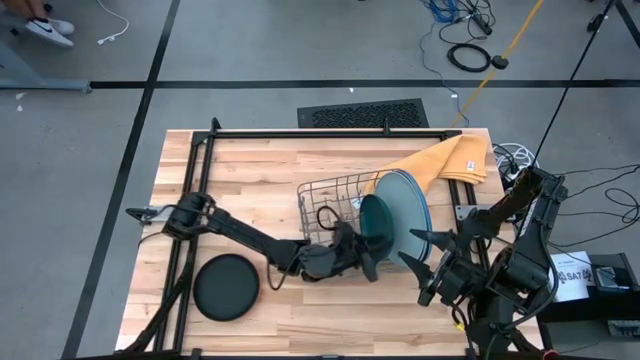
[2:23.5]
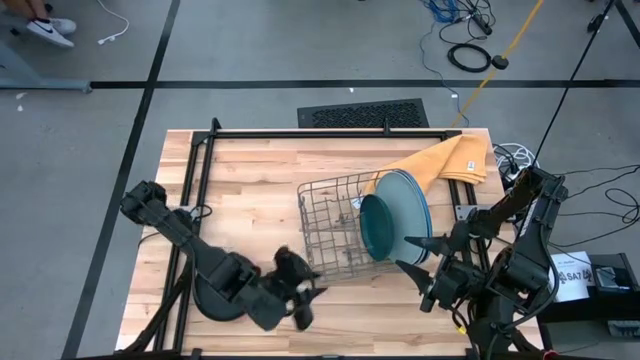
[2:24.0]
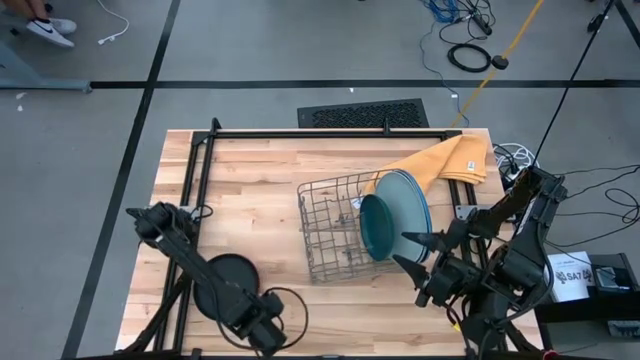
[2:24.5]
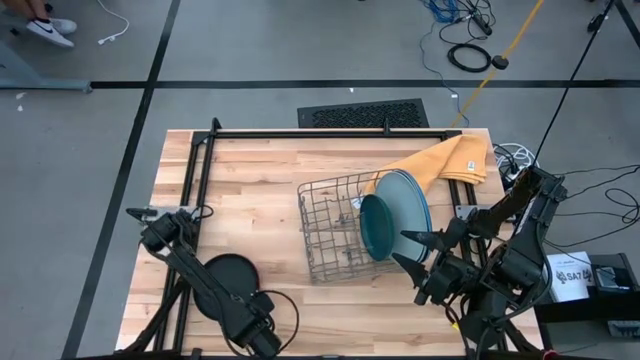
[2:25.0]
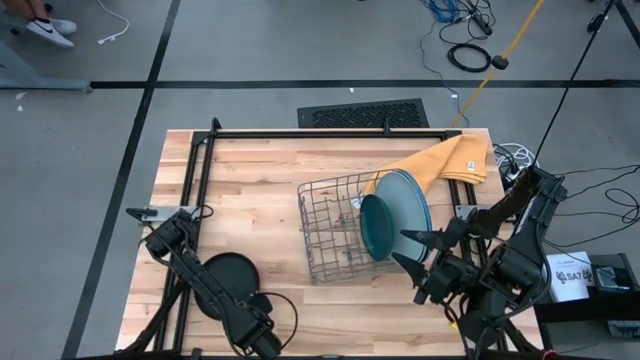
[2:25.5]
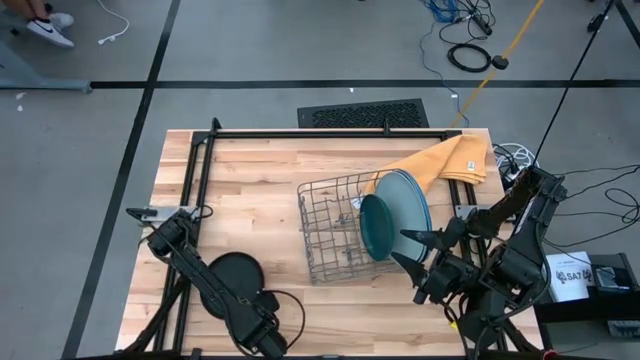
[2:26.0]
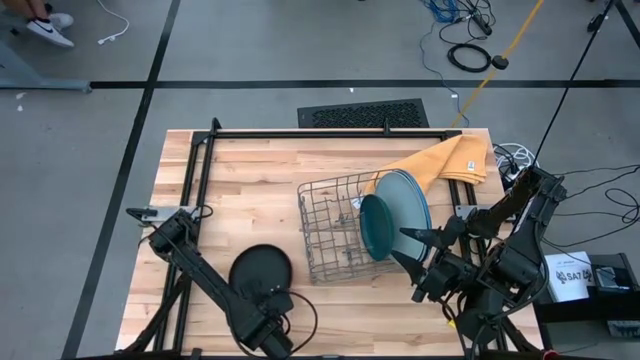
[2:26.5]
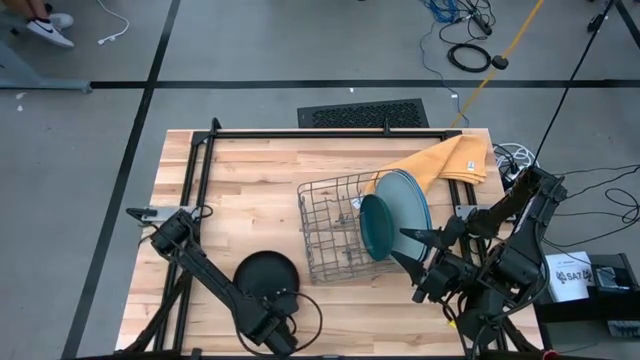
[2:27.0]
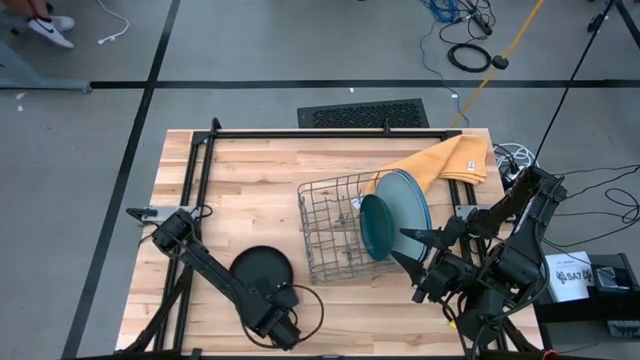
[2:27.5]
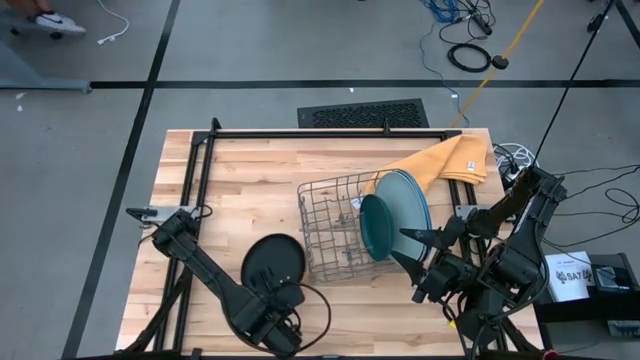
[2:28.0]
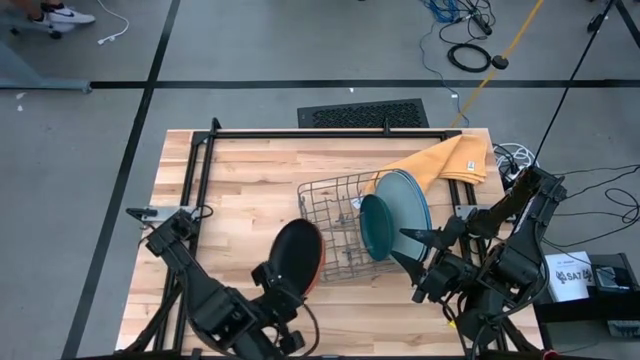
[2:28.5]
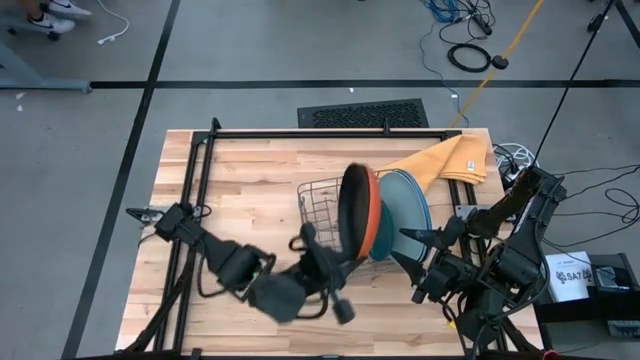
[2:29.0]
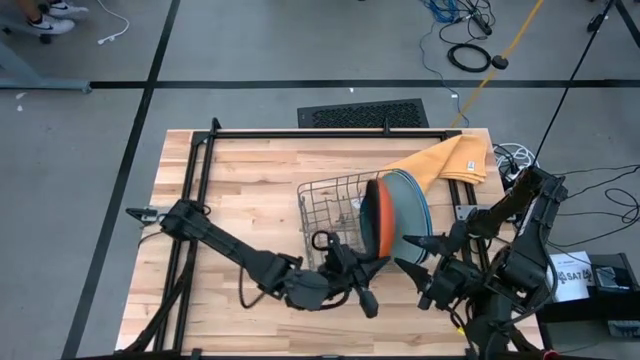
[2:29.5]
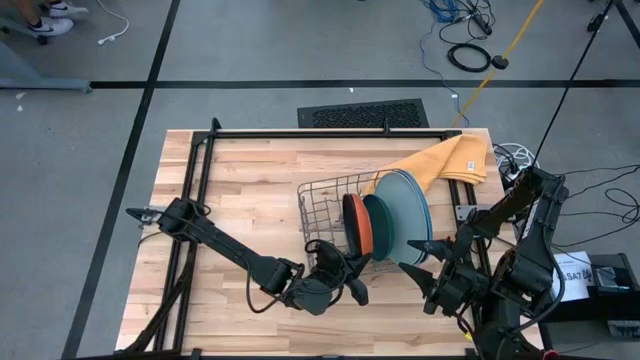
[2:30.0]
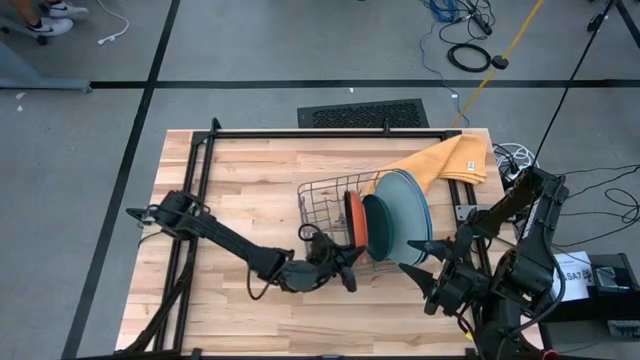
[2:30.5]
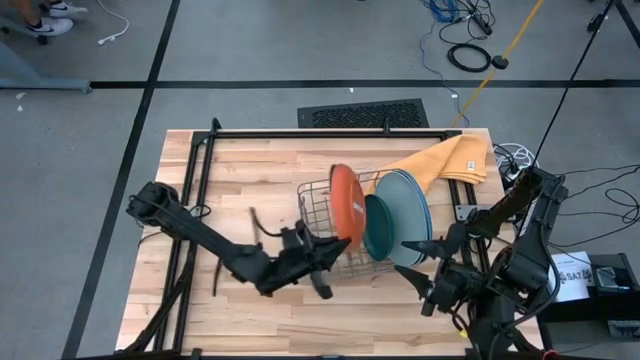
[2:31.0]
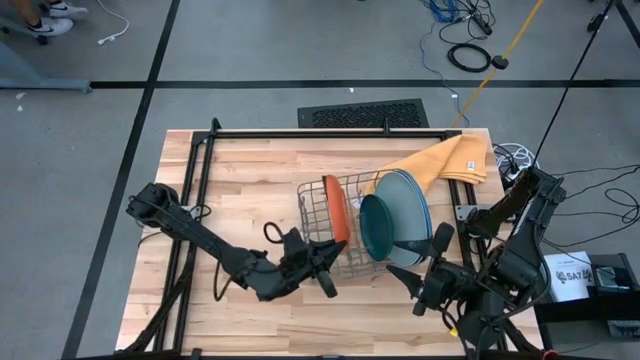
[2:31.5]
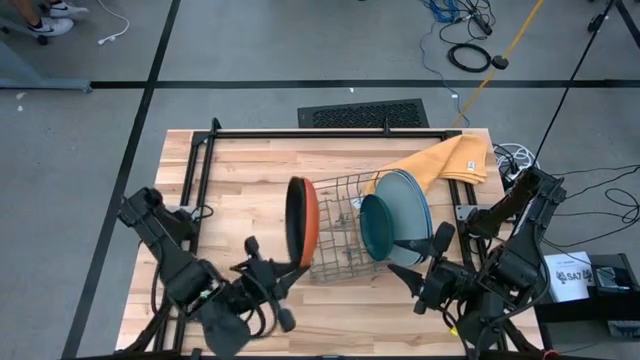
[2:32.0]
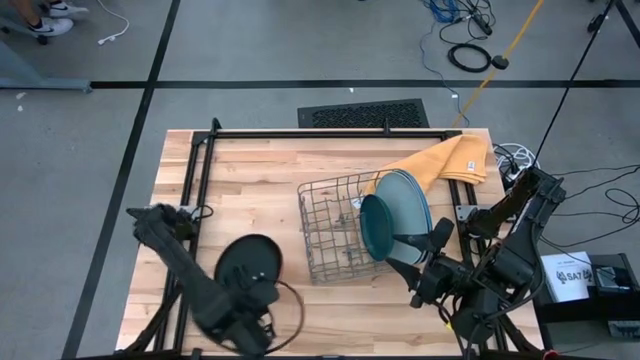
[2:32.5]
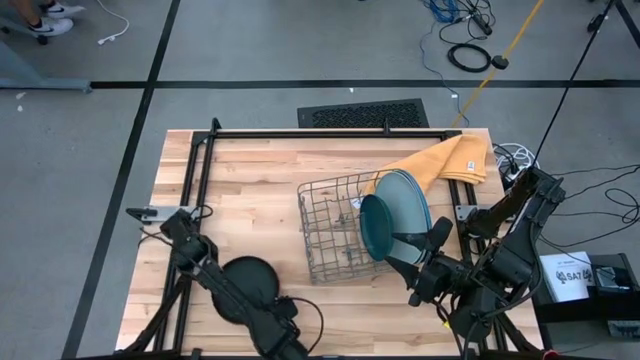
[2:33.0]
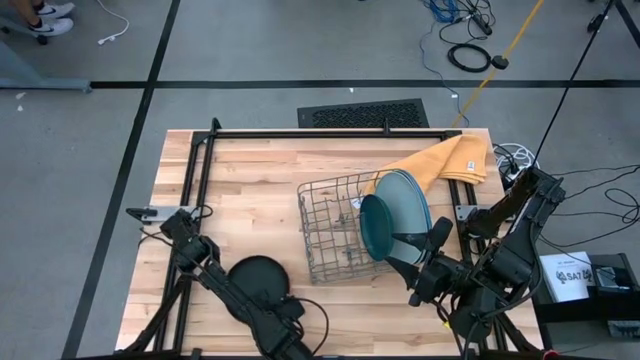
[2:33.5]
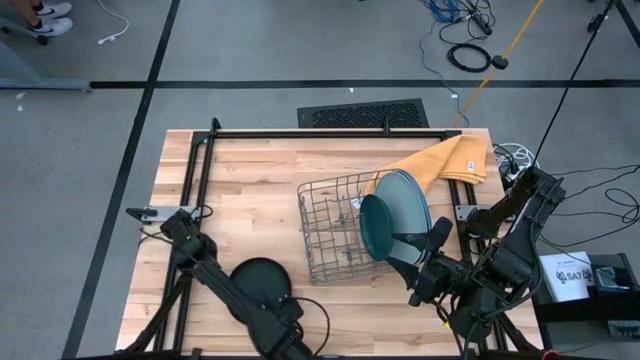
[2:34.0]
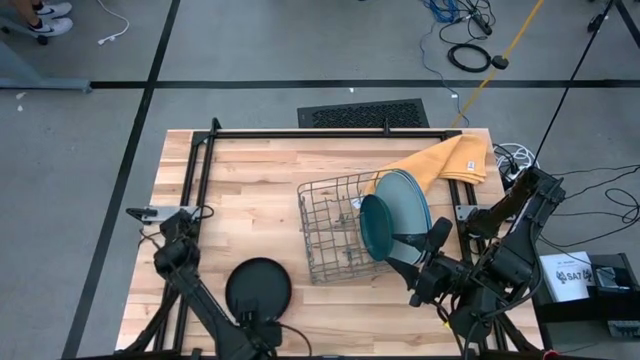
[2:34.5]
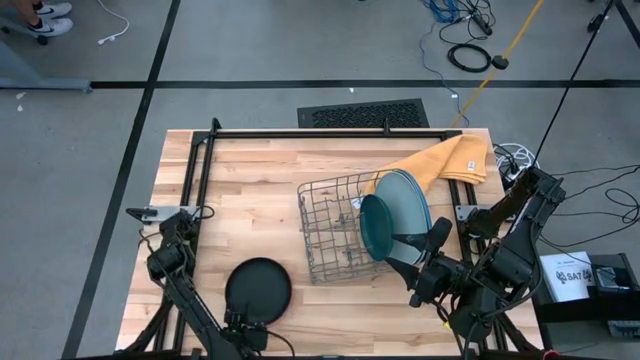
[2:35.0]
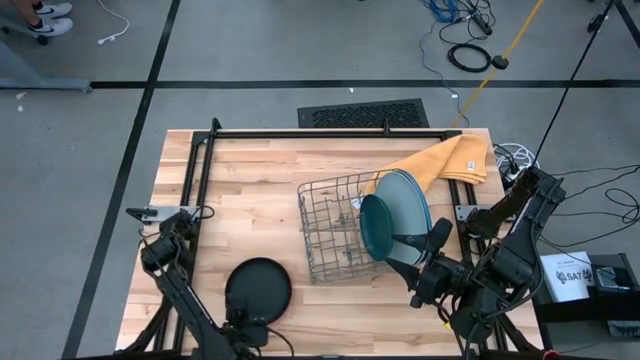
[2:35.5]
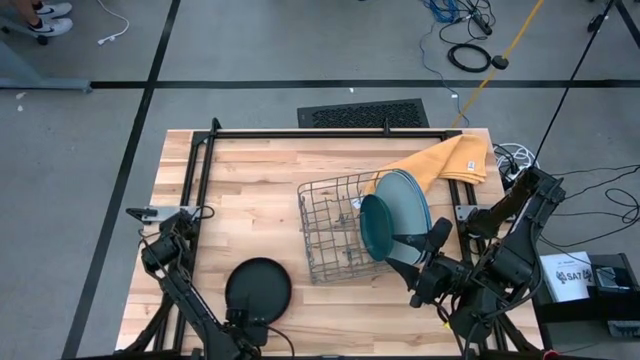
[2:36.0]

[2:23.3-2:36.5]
Task: Sort dishes
Put the black plate into the green dish rack

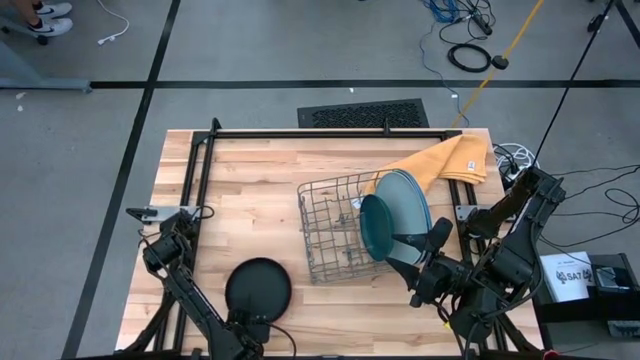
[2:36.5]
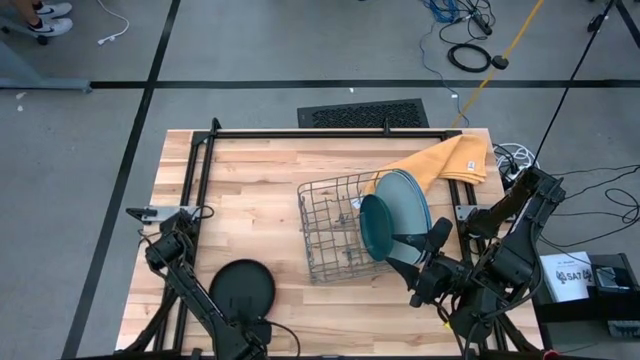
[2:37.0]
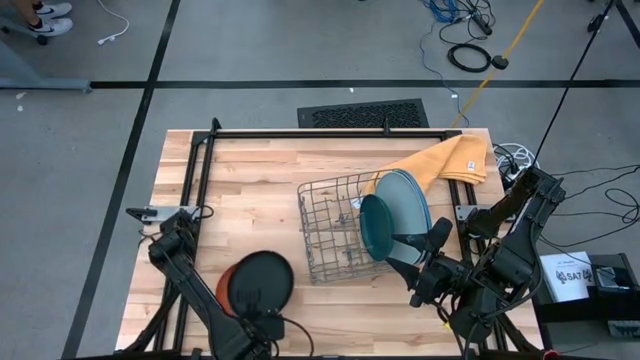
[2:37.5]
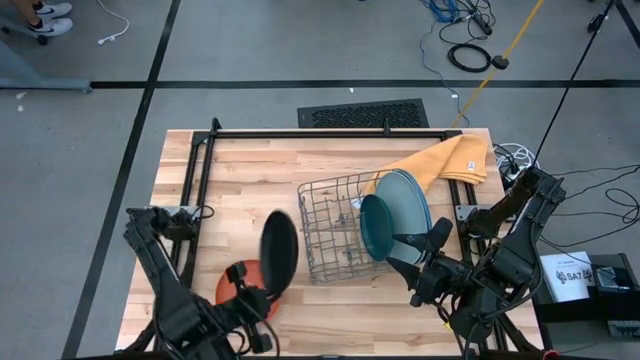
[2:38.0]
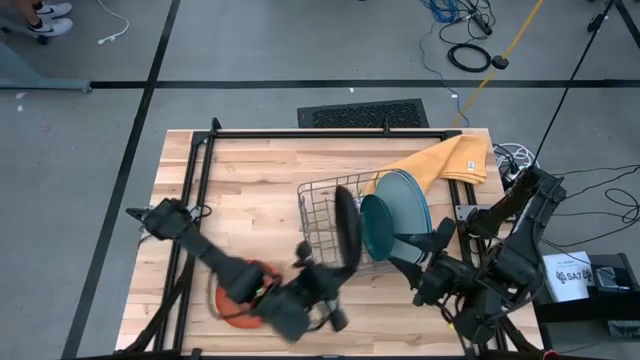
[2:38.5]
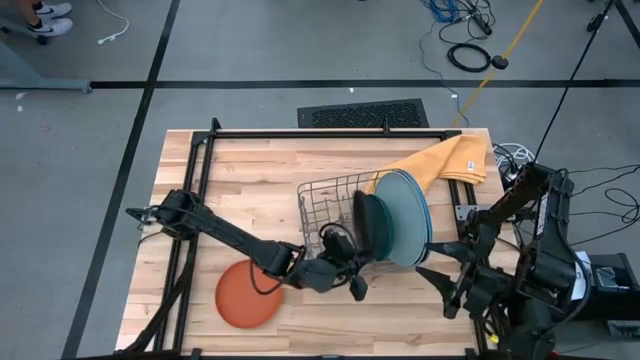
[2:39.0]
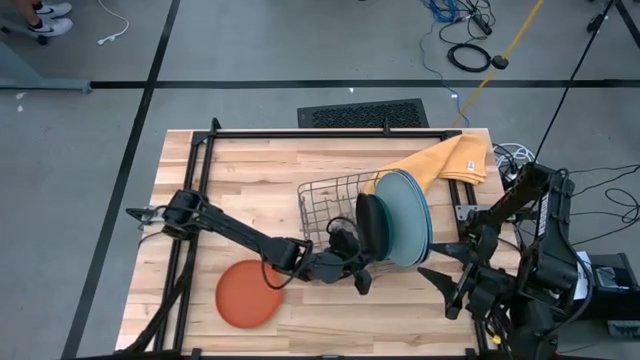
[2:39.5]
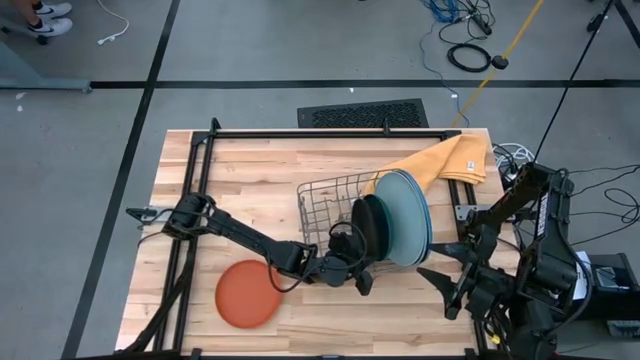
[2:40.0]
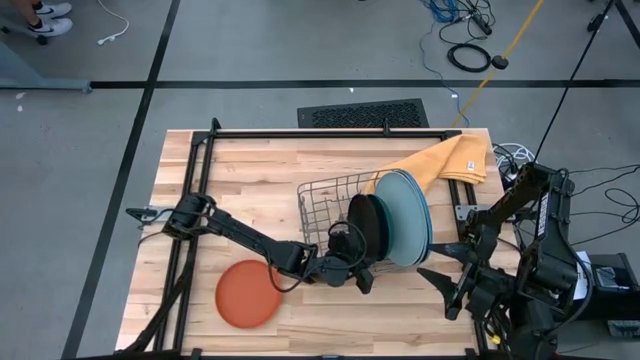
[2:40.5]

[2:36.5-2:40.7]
Put the black plate into the green dish rack

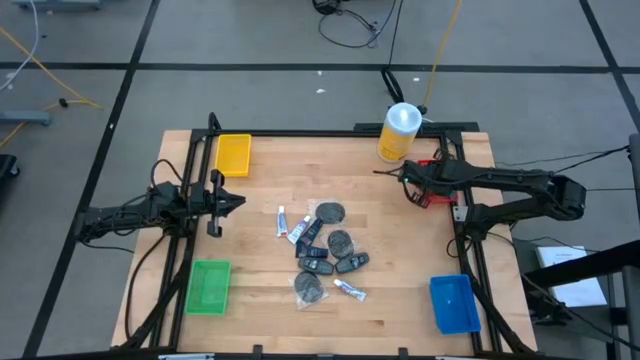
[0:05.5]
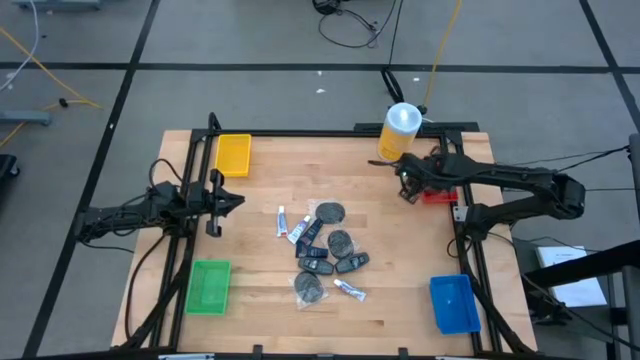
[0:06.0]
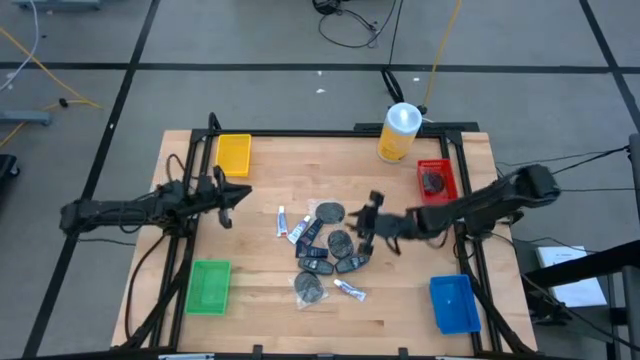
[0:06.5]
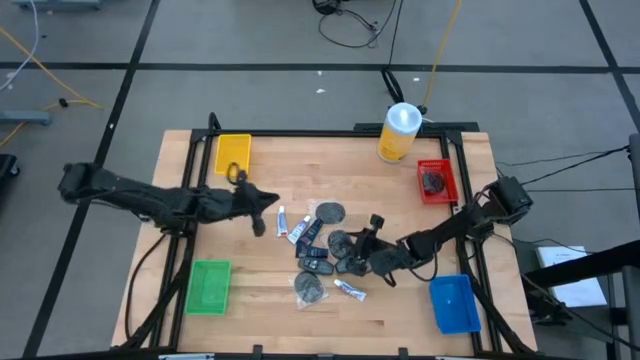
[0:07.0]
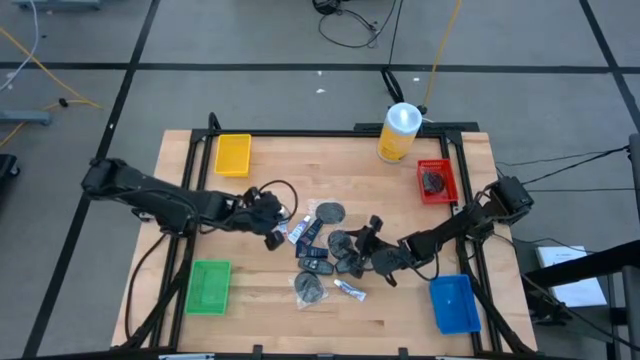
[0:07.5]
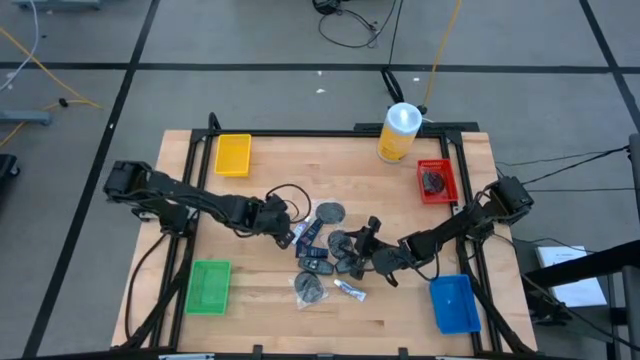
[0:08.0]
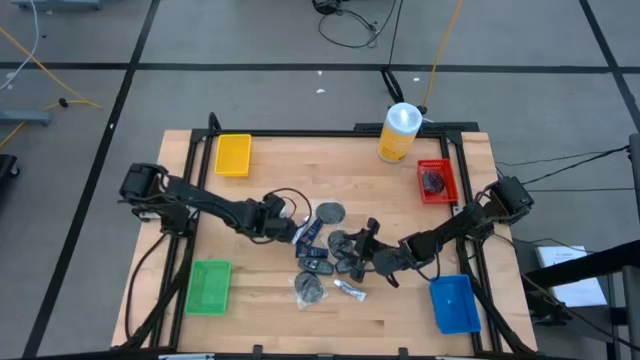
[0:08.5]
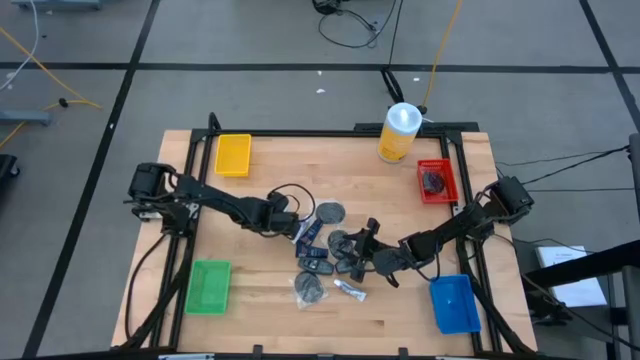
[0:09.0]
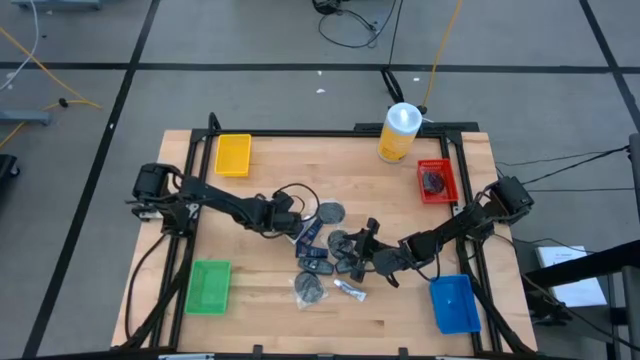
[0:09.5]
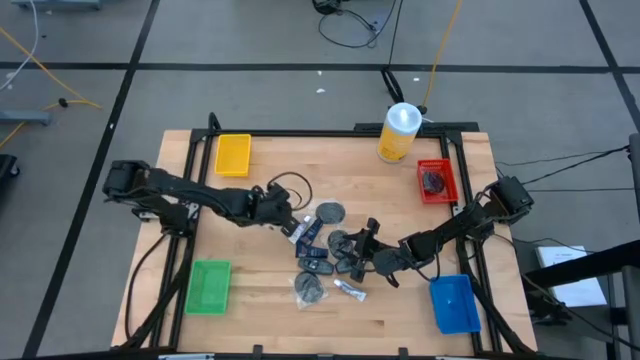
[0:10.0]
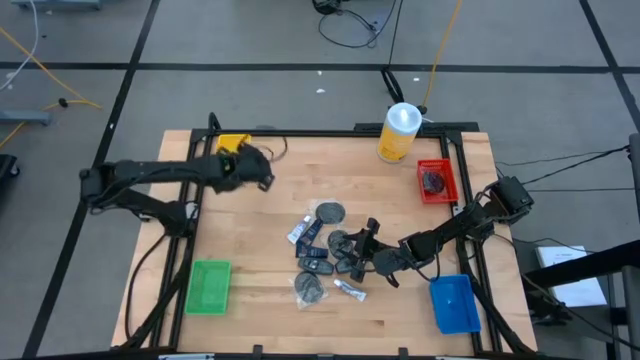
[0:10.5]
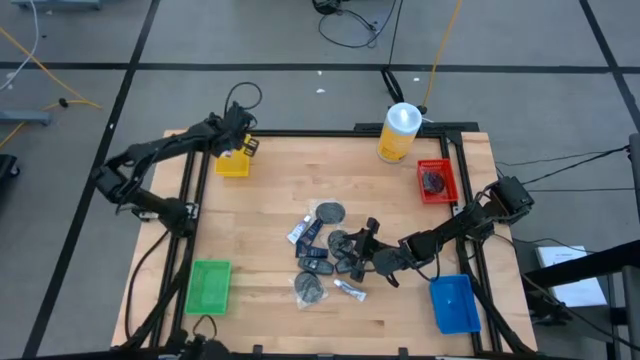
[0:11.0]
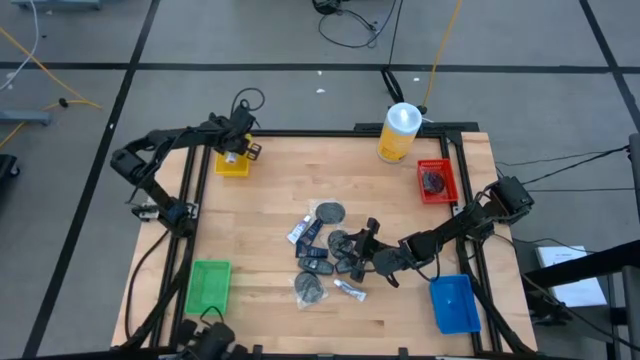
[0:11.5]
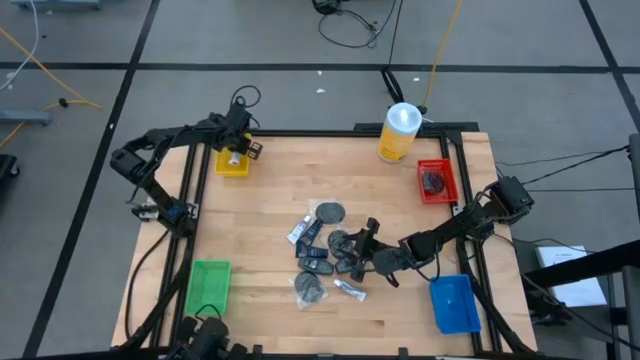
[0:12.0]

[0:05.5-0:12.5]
Task: Pick & Place Travel size toiletries
Put the white toothpaste into the yellow bin
